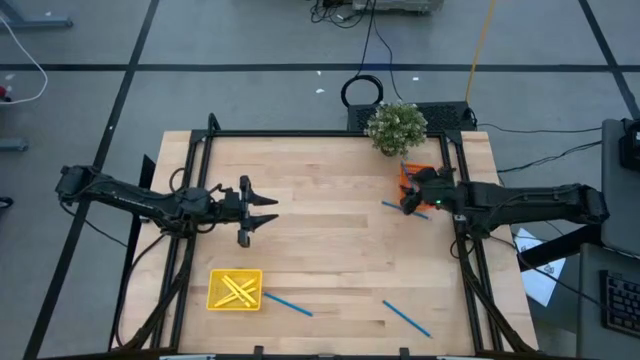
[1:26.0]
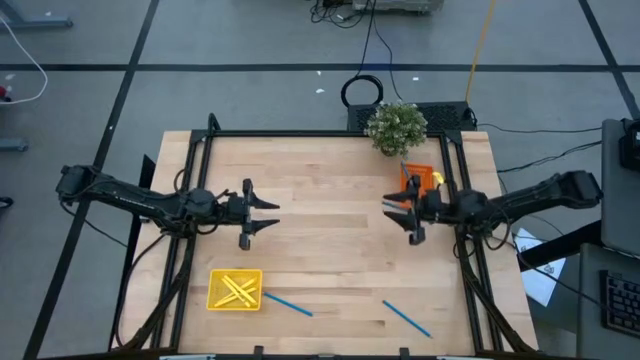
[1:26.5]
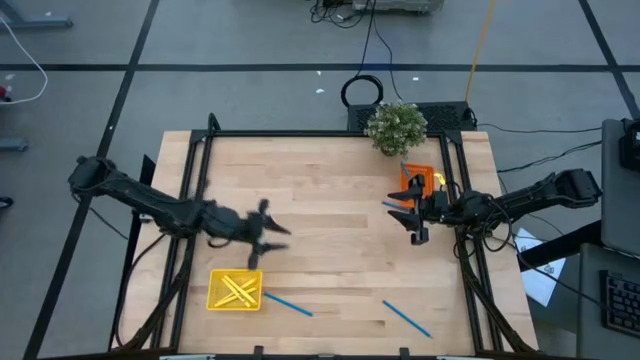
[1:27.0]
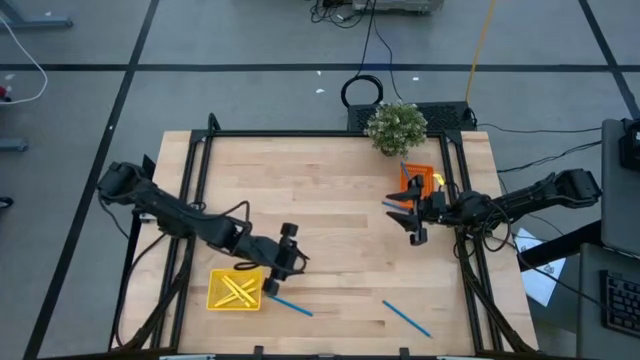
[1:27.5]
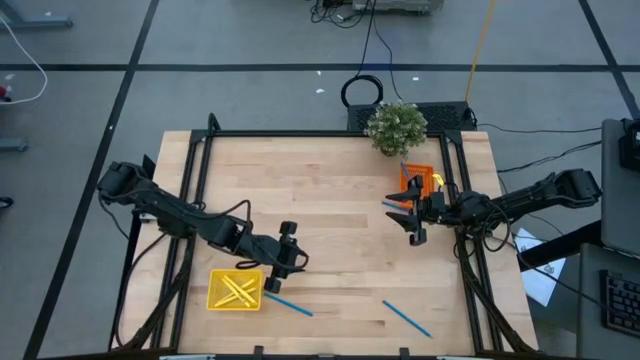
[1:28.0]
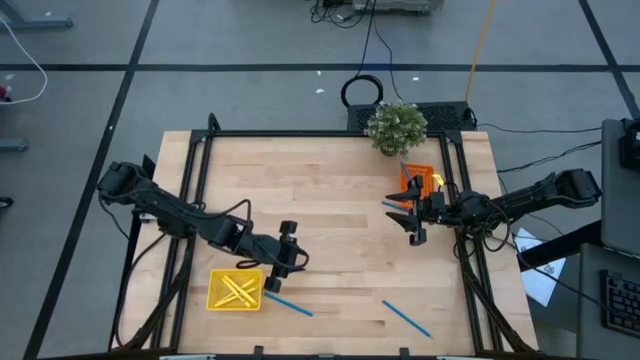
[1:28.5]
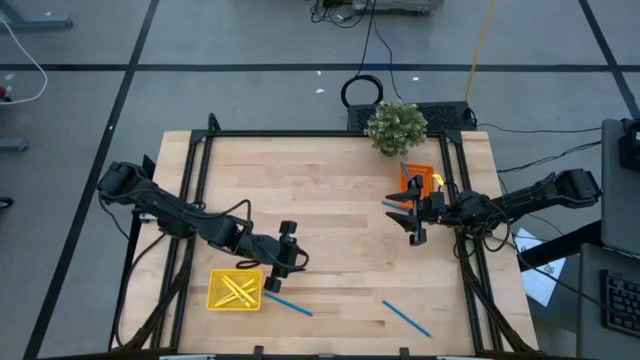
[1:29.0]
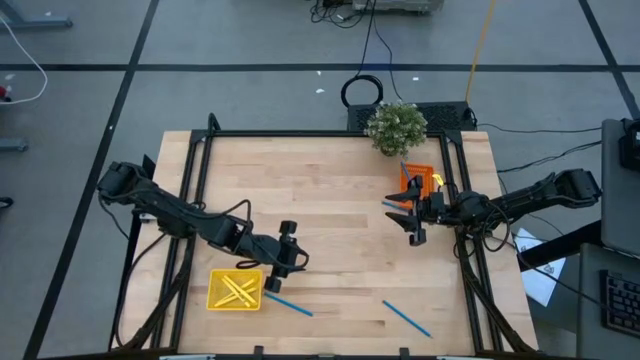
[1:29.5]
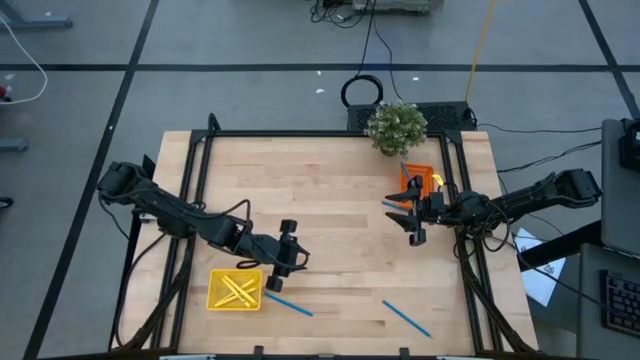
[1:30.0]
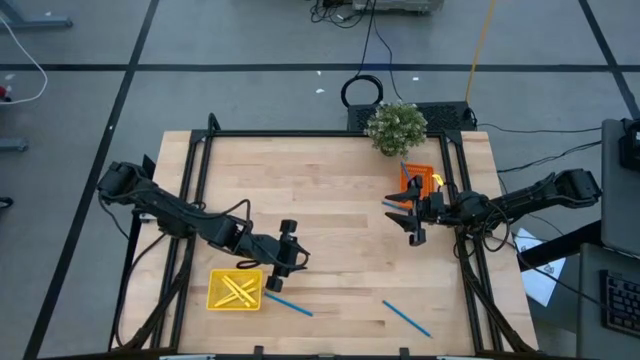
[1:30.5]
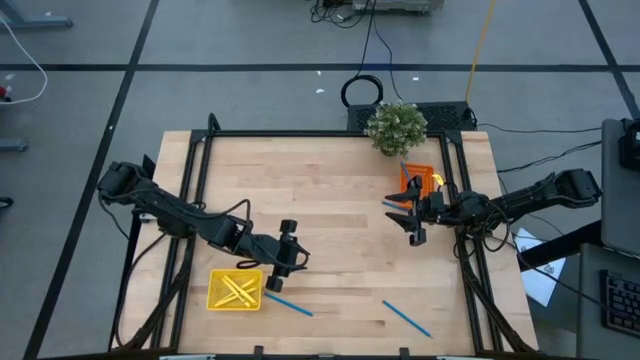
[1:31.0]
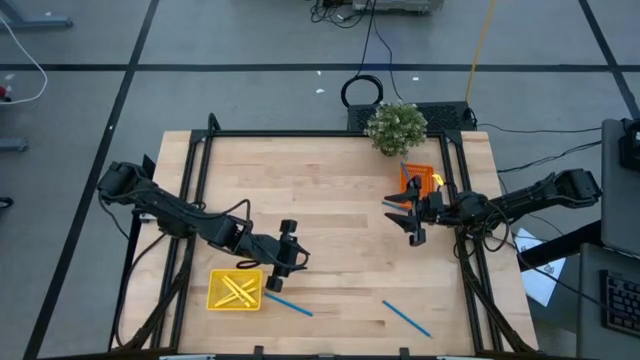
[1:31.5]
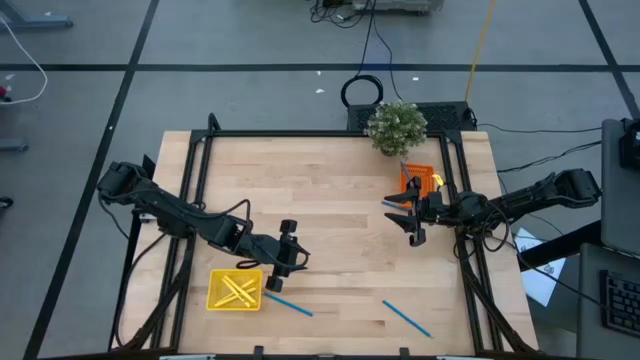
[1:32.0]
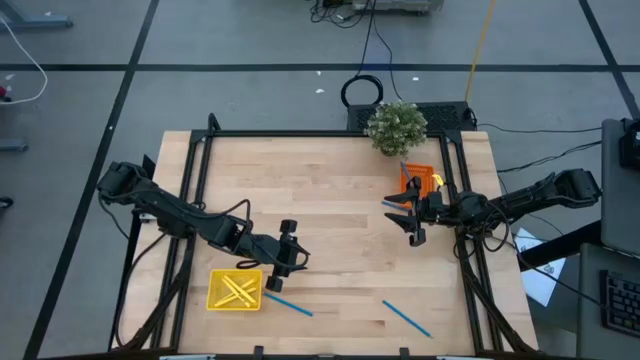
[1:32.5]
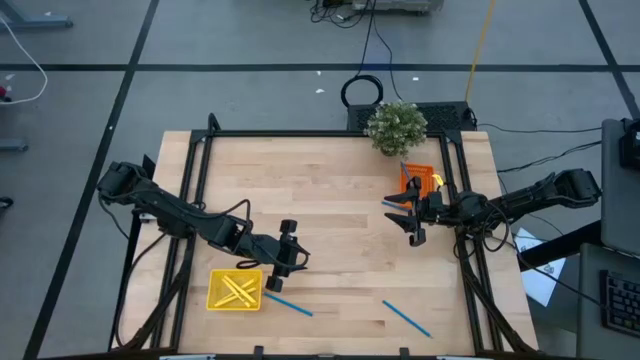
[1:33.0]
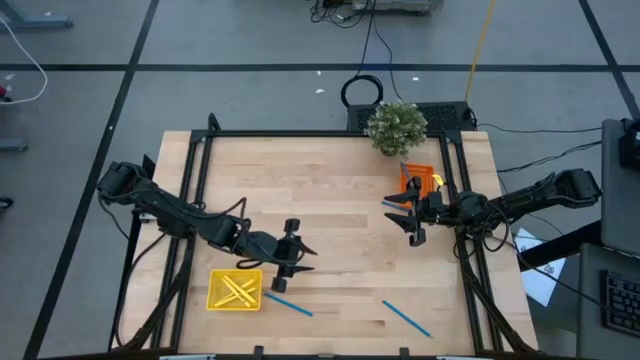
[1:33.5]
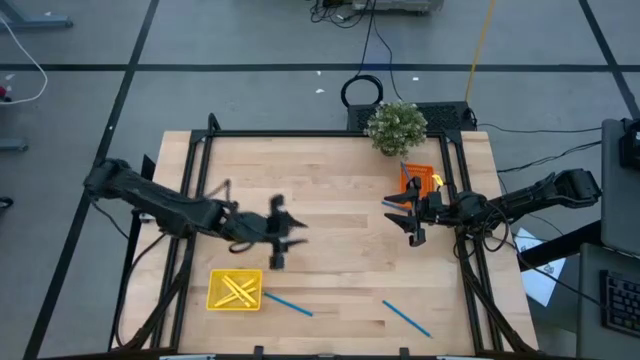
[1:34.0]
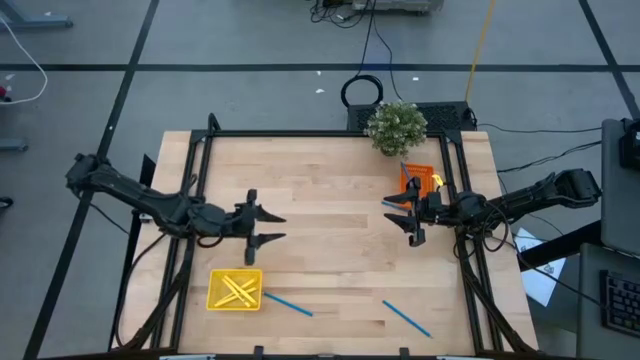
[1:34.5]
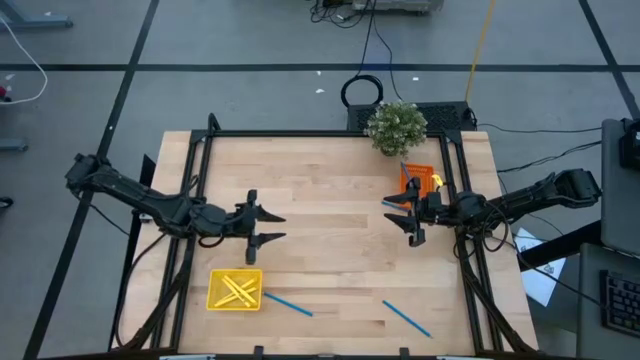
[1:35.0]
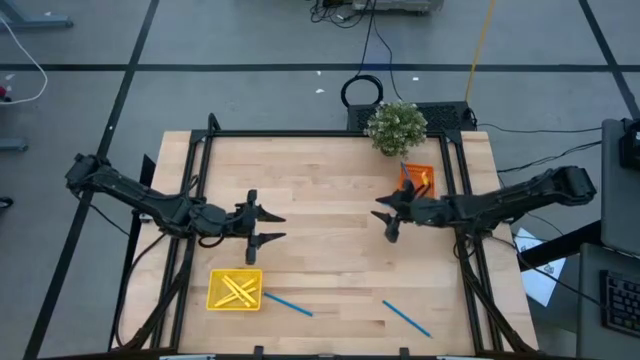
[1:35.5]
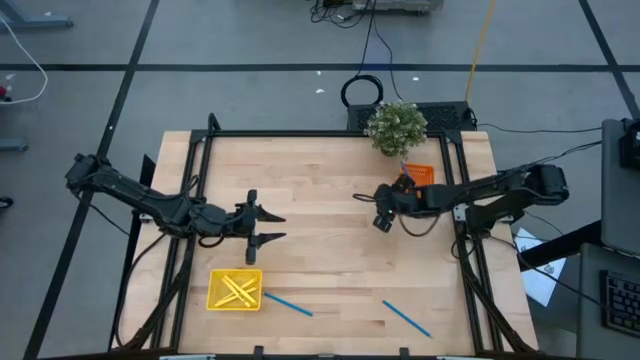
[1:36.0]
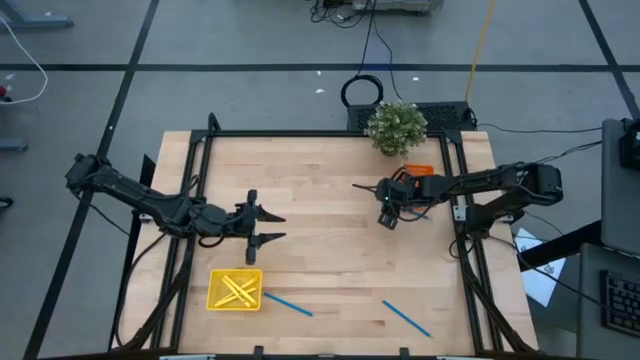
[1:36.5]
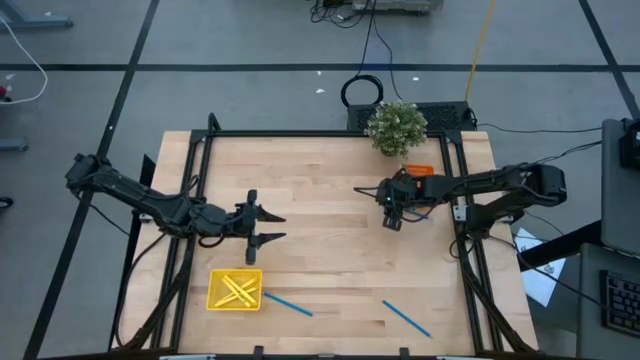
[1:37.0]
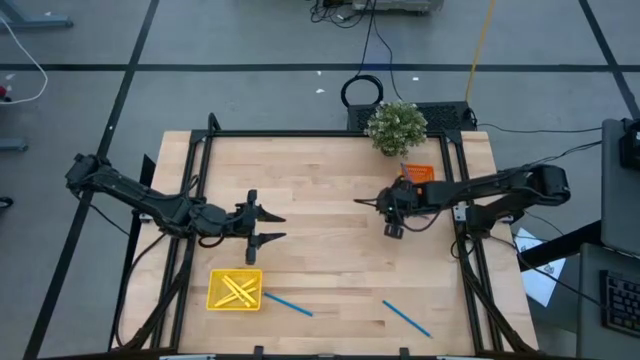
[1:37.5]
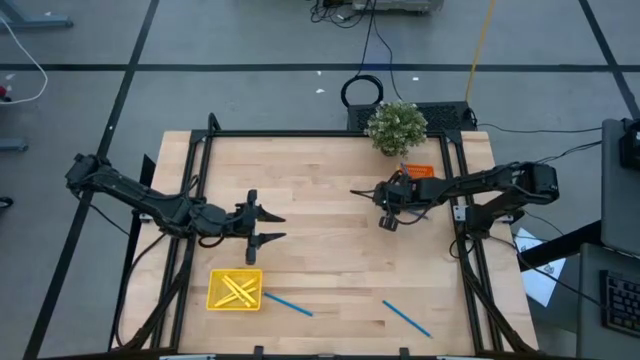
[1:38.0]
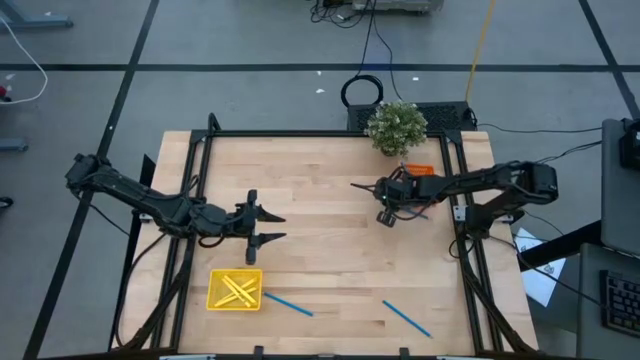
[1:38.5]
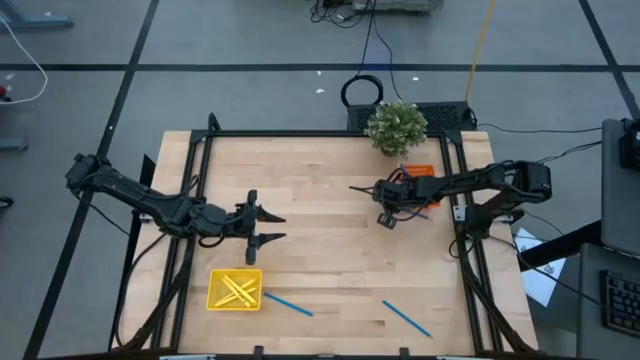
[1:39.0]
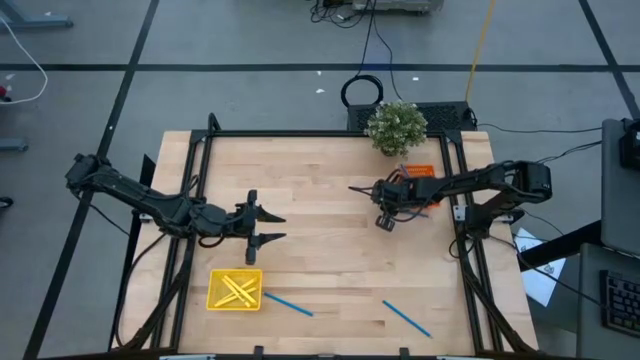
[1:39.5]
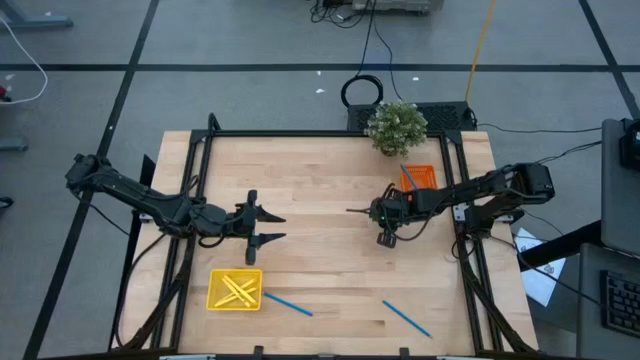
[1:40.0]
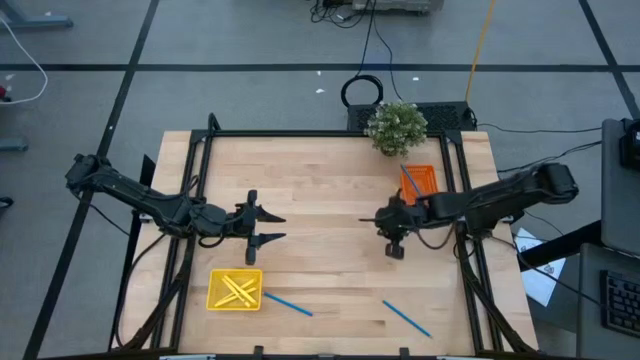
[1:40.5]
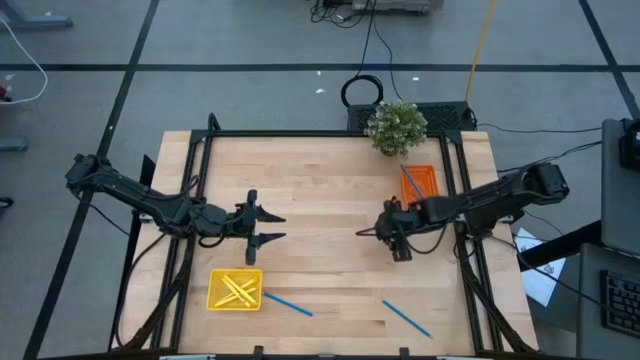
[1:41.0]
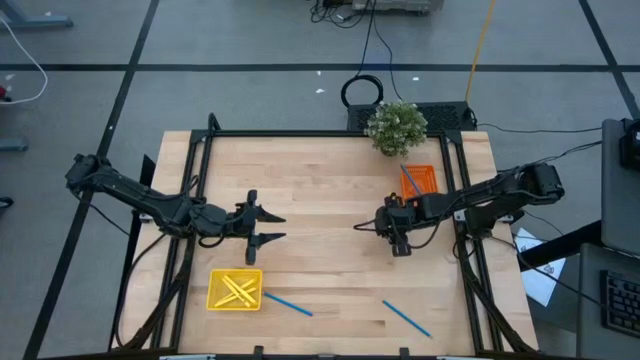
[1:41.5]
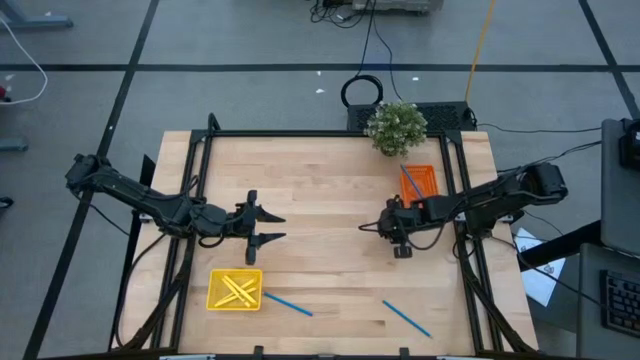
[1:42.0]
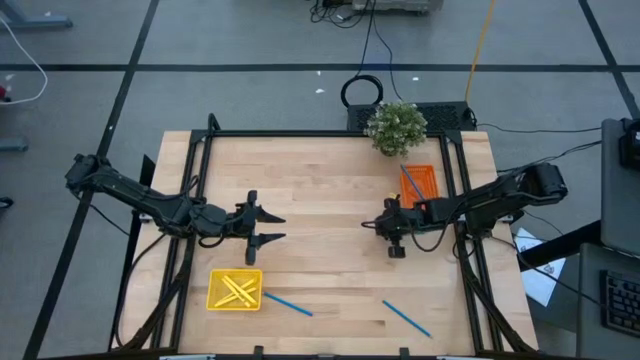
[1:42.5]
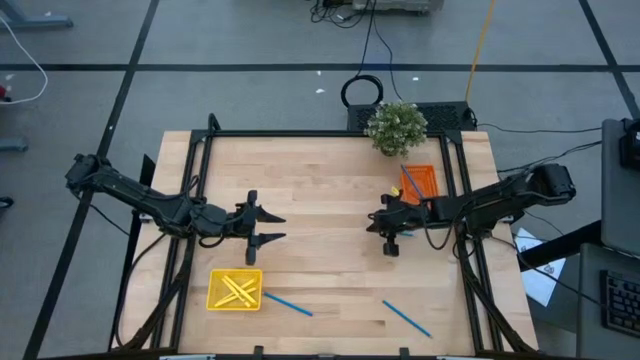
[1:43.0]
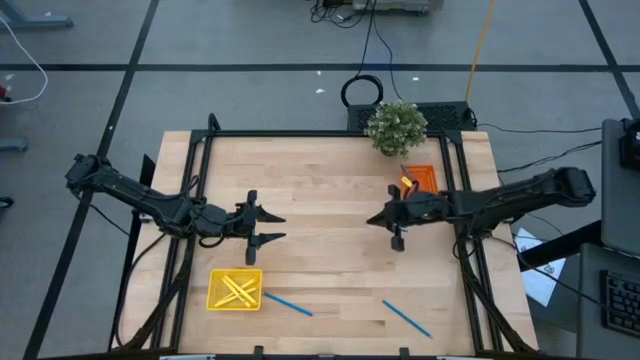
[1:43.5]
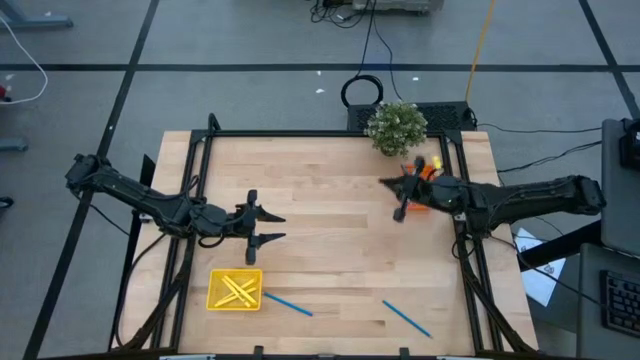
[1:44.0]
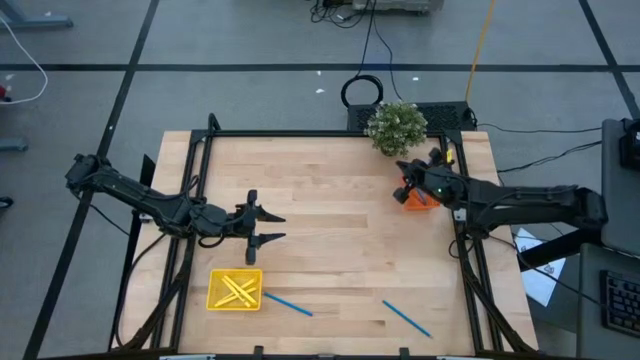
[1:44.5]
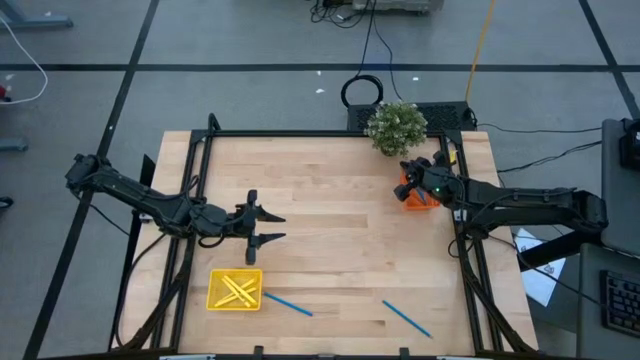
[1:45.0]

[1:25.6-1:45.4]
Task: Sort pens & pencils
Put the top right blue pencil into the orange bin

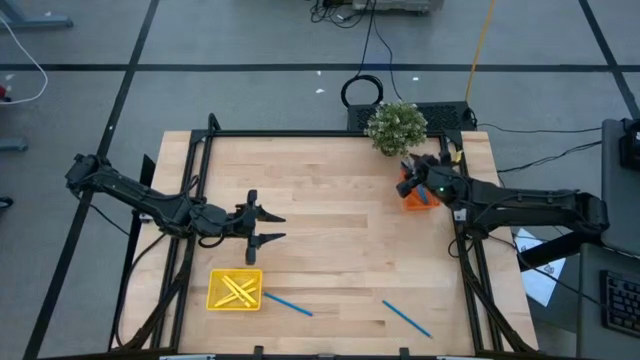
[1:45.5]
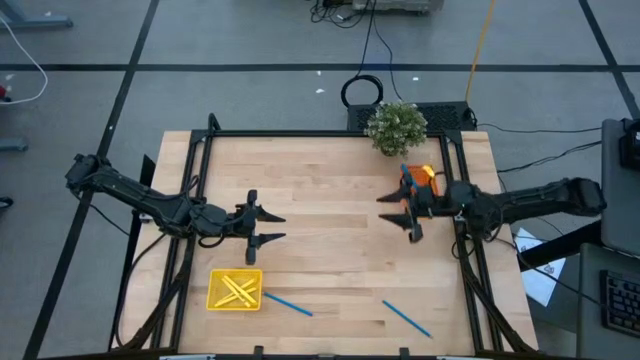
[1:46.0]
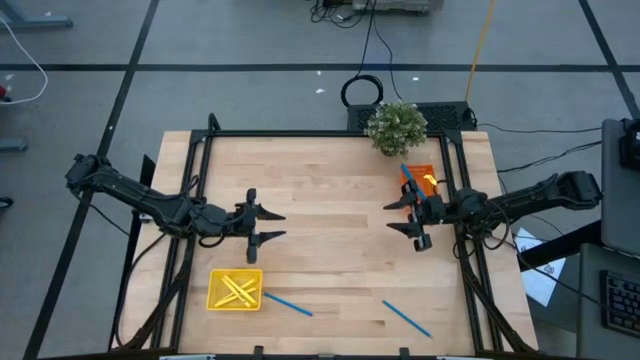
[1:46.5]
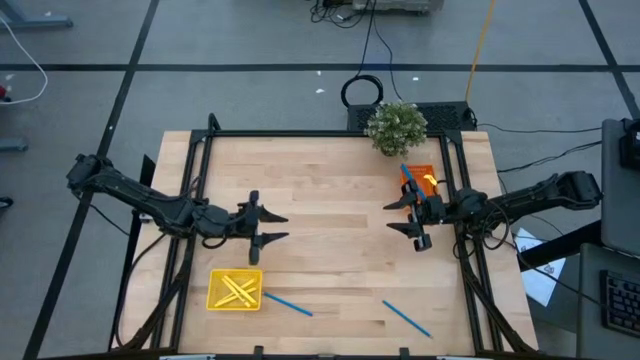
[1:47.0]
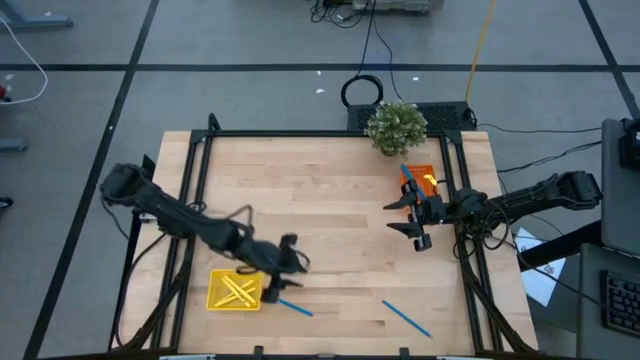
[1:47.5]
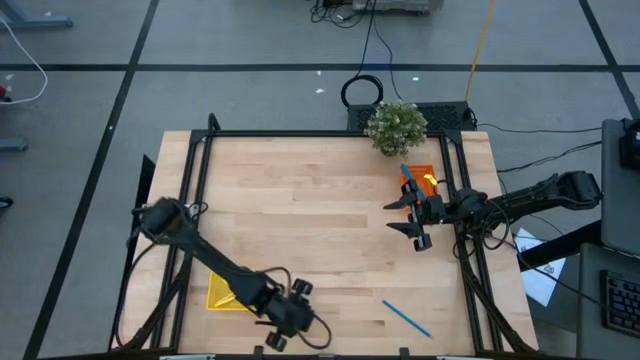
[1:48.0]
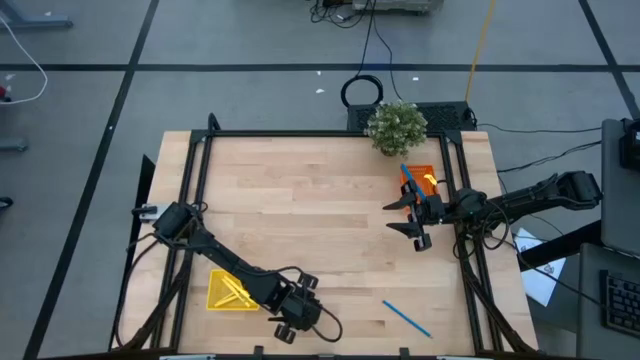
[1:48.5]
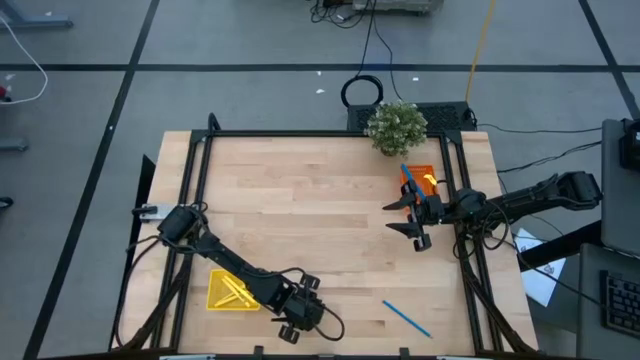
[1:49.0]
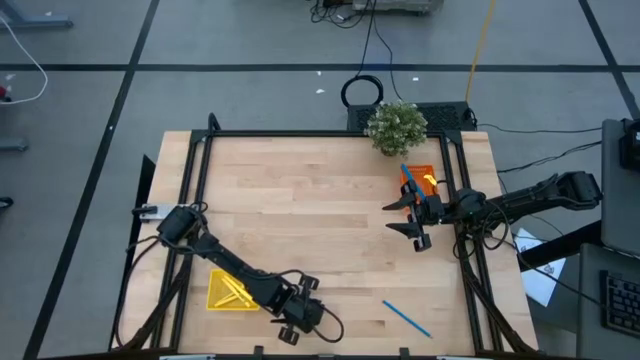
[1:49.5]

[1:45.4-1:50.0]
Put the left blue pencil into the orange bin
